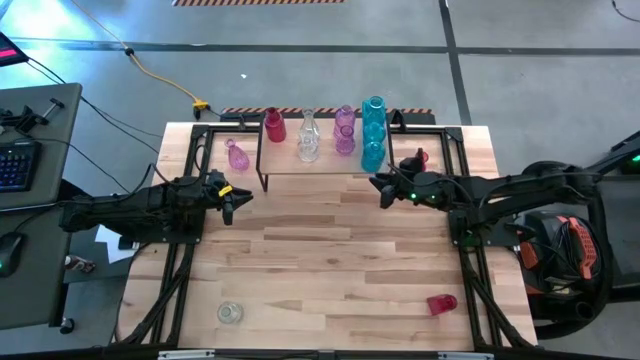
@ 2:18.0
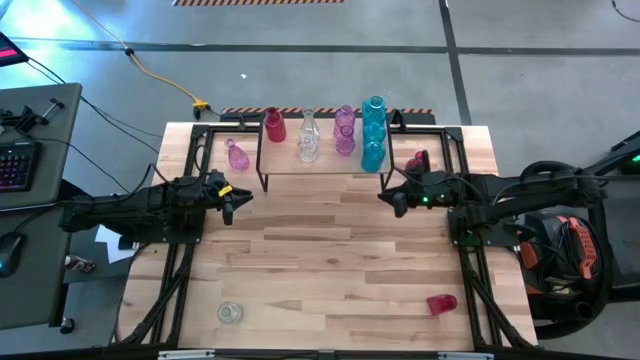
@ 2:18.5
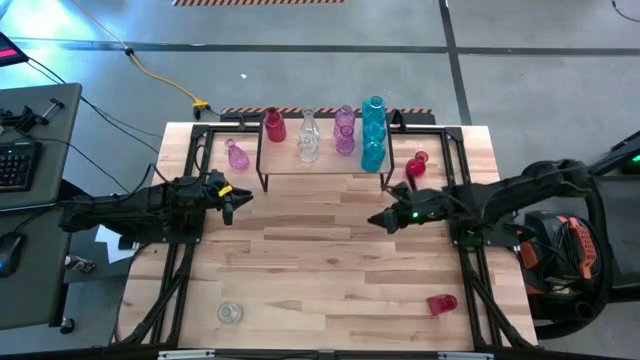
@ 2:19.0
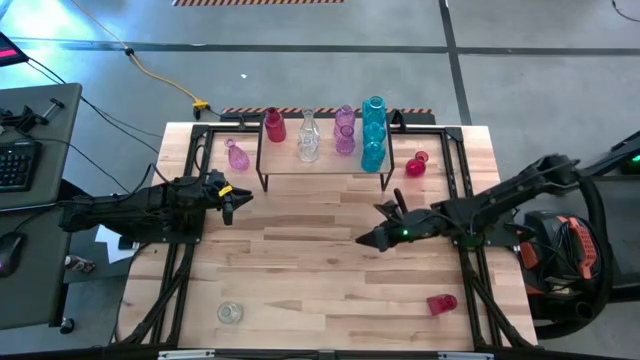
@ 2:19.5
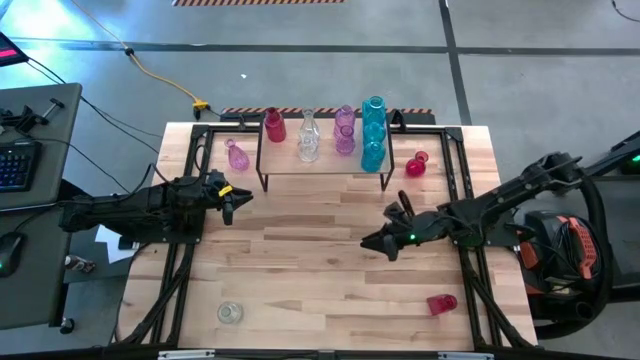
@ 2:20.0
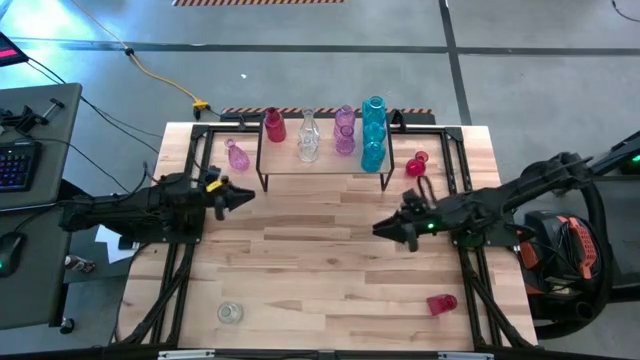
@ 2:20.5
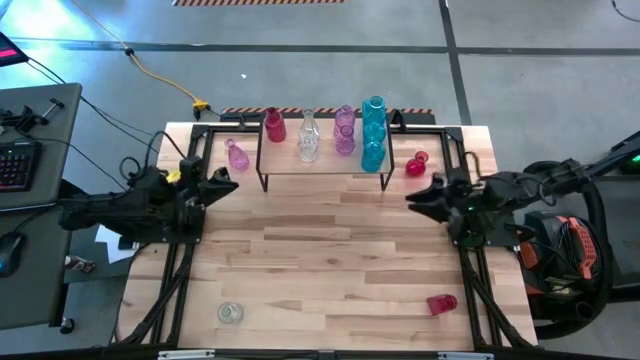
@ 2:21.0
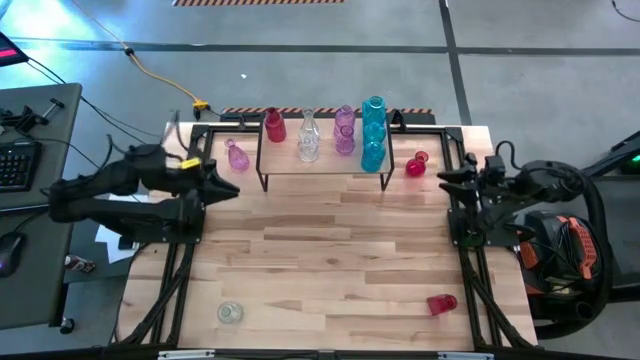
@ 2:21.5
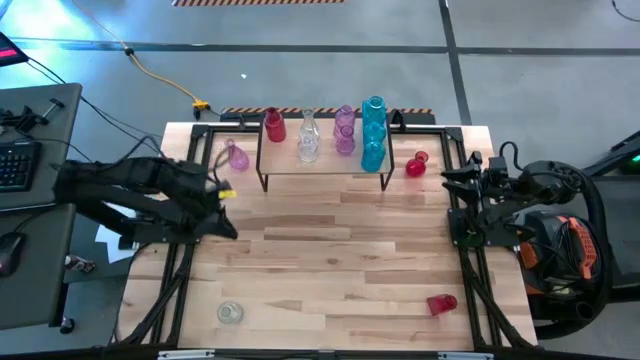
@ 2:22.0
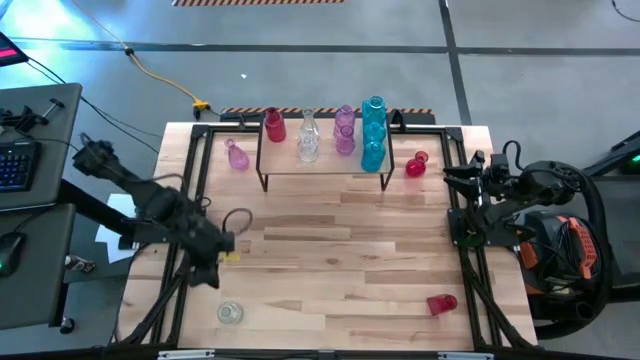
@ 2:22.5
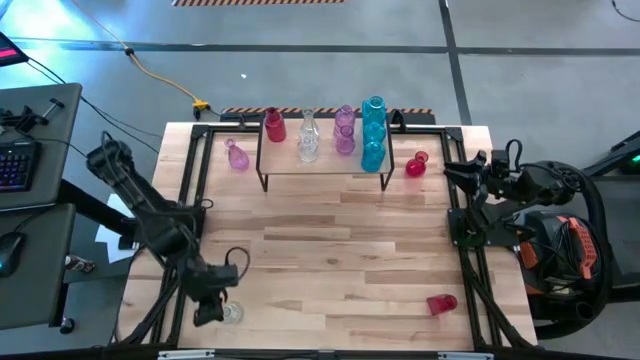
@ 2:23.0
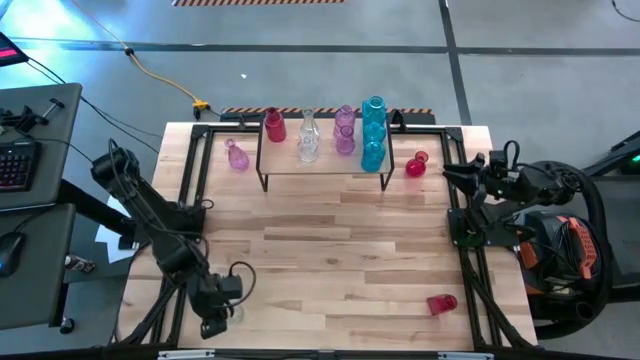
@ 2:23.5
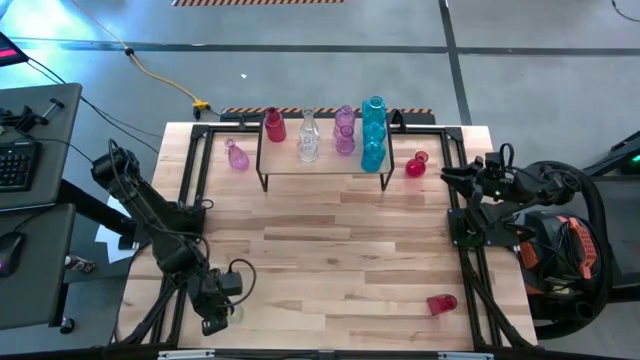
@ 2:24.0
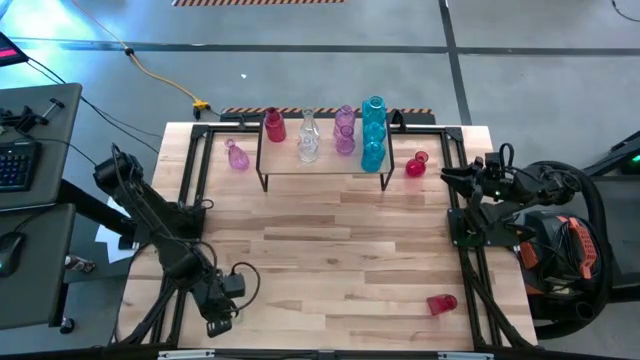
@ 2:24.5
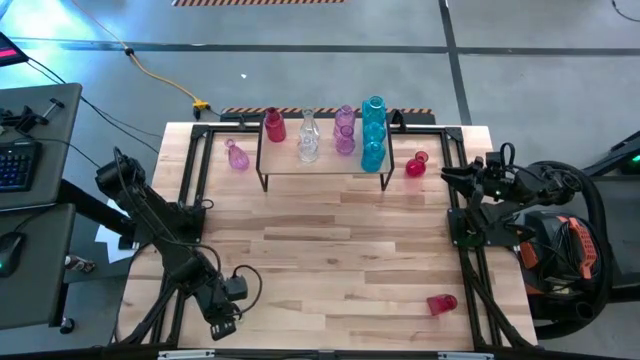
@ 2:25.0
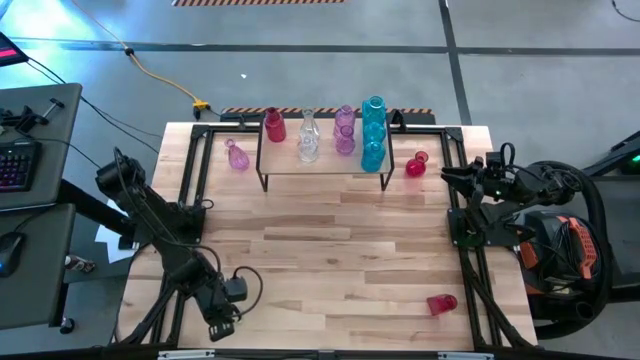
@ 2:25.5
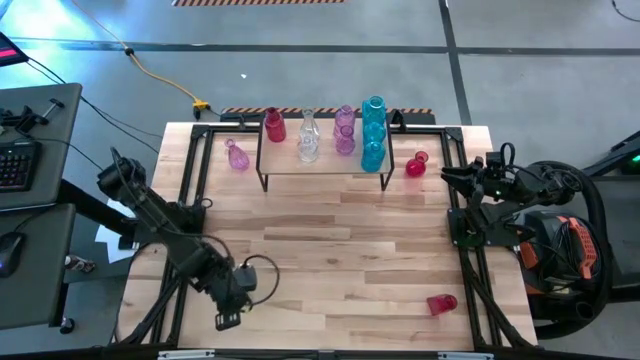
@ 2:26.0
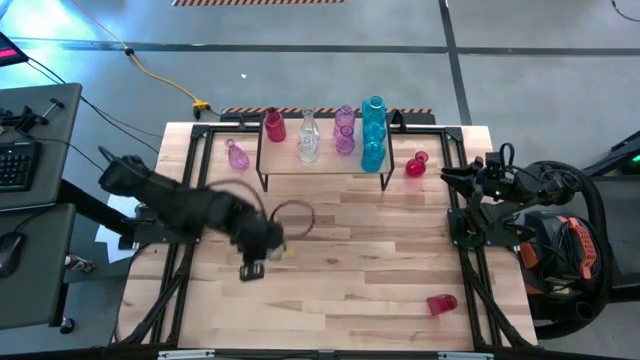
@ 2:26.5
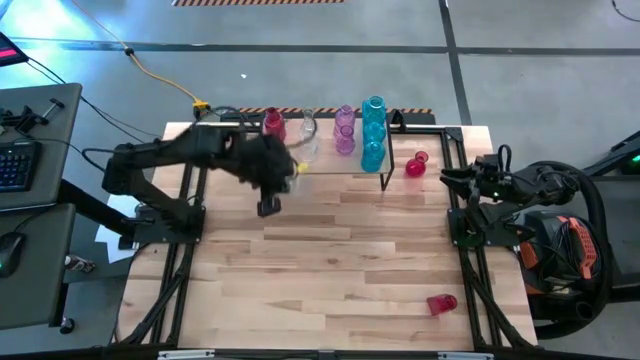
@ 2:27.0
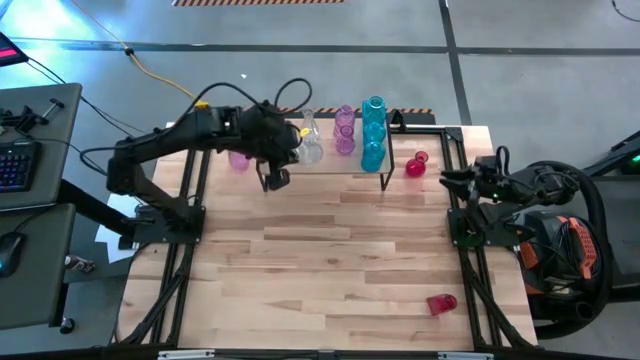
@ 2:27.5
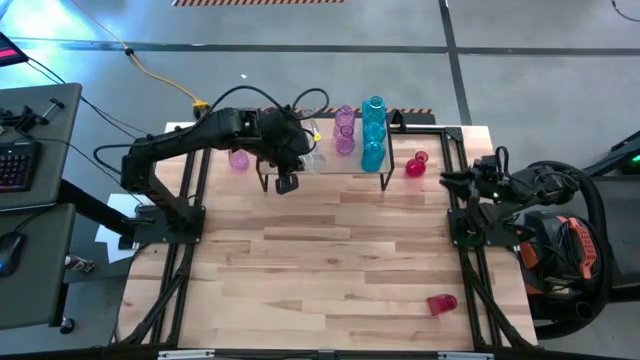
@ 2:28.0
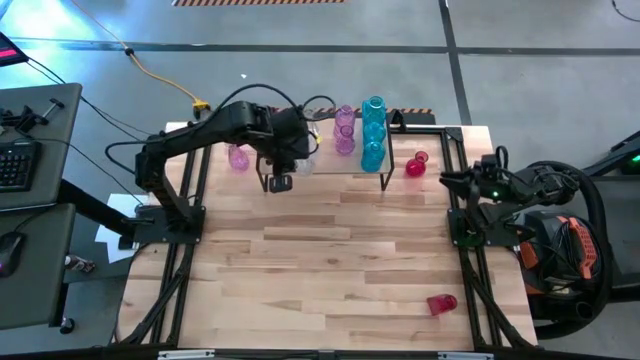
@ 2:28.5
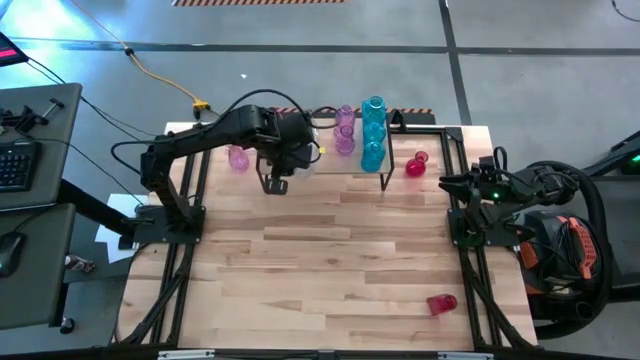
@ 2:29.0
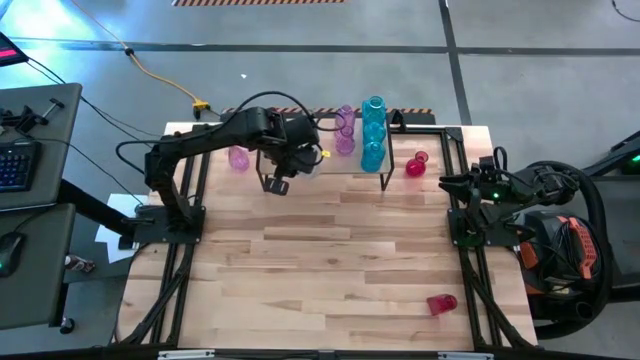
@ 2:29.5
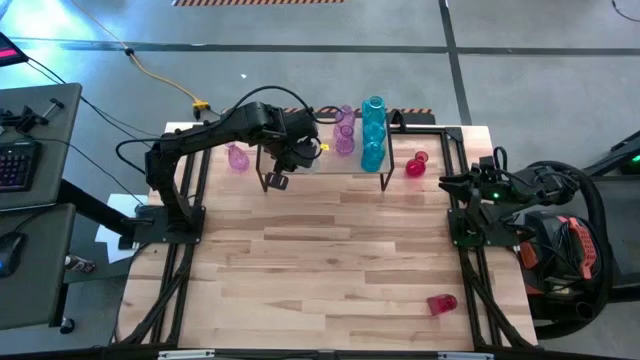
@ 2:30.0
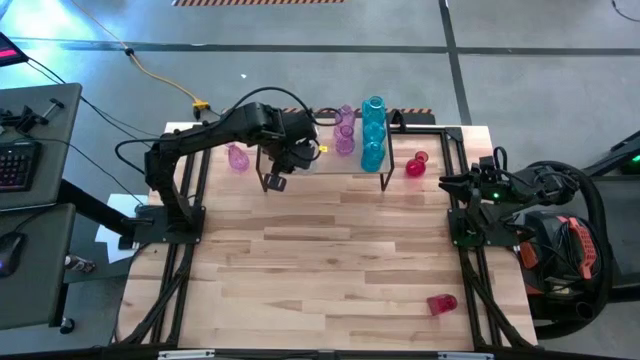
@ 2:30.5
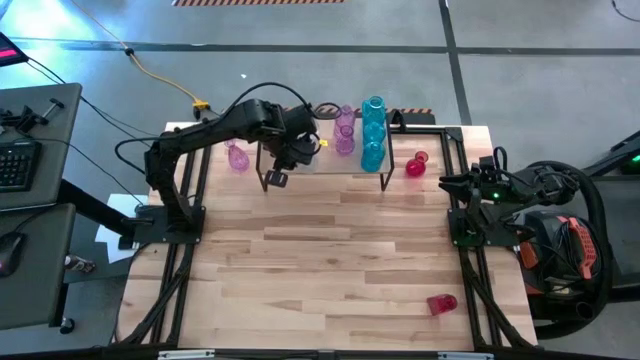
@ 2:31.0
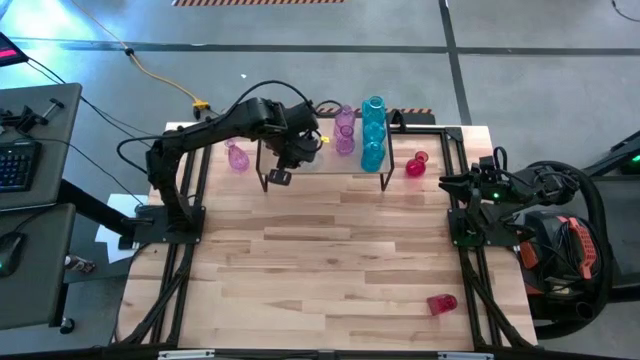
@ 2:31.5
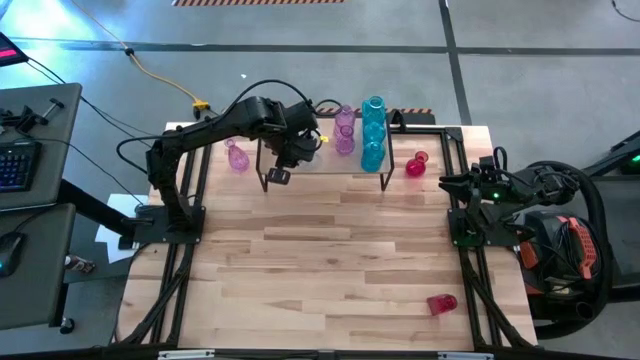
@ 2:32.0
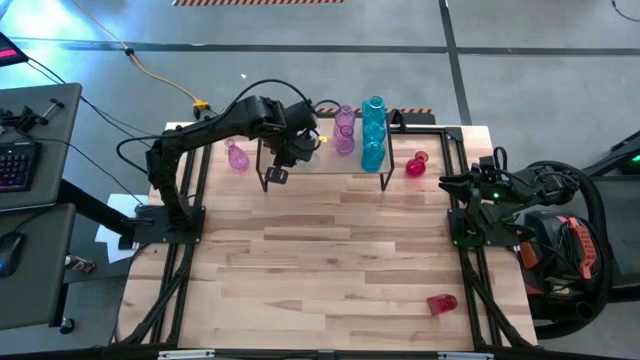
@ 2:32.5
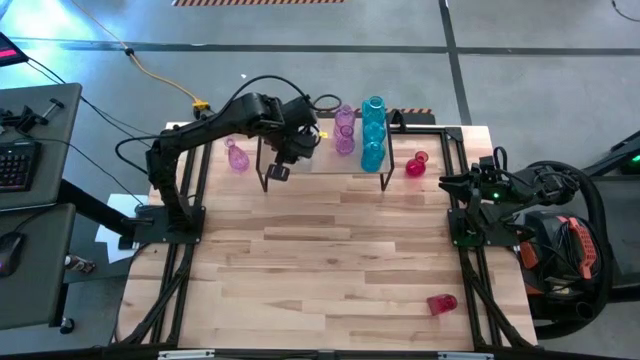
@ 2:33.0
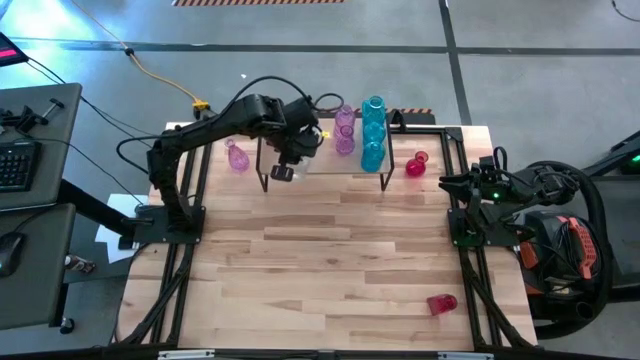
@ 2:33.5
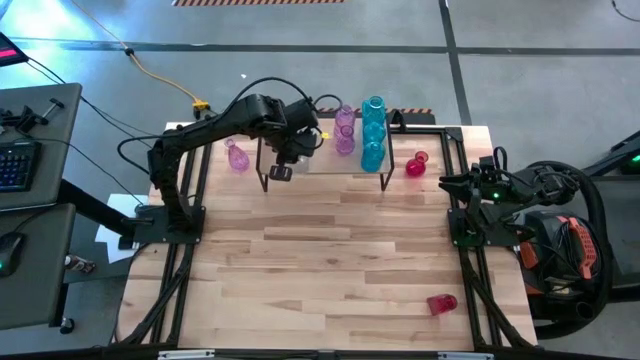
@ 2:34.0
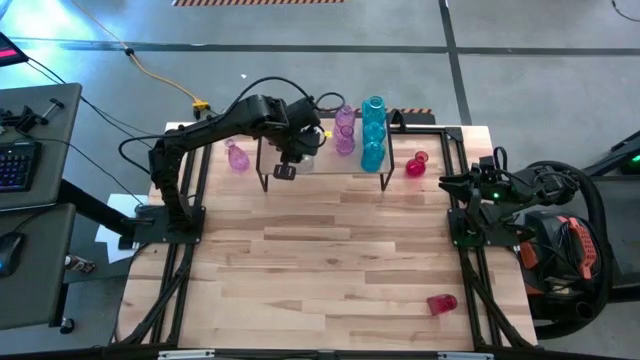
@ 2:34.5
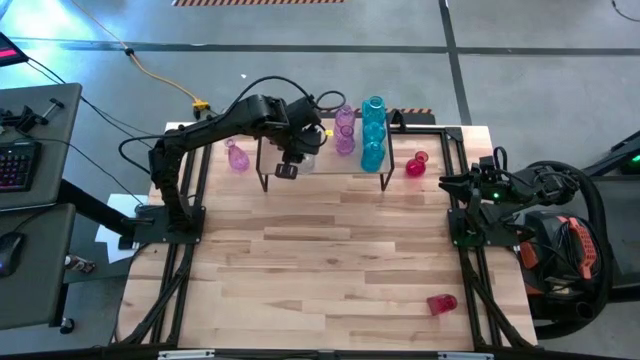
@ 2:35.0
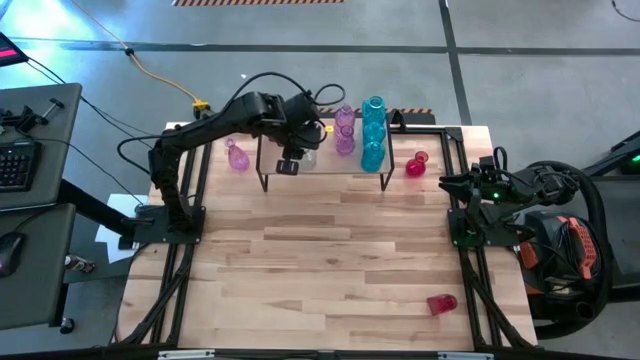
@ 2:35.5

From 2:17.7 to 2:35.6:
Task: sort vases onto shelf
Put the transparent vase on the shelf aligned with the other transparent vases

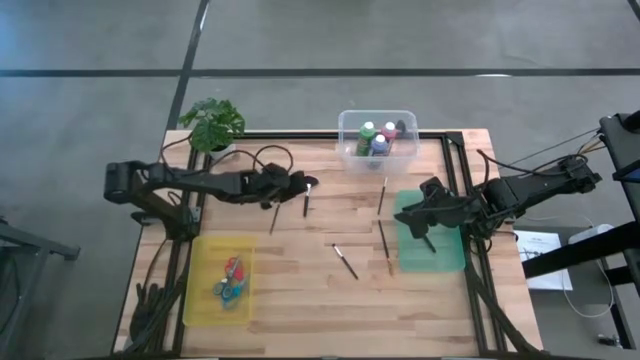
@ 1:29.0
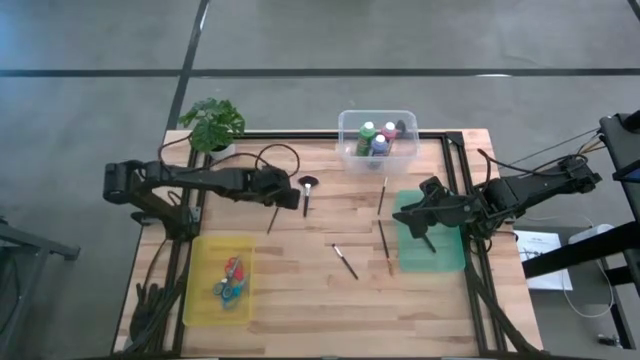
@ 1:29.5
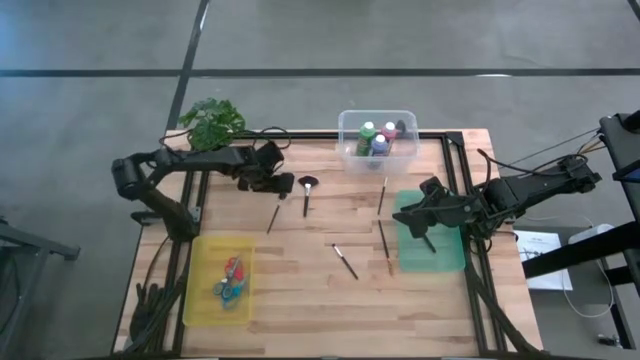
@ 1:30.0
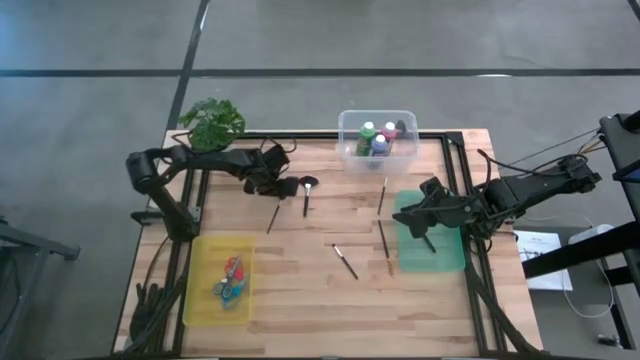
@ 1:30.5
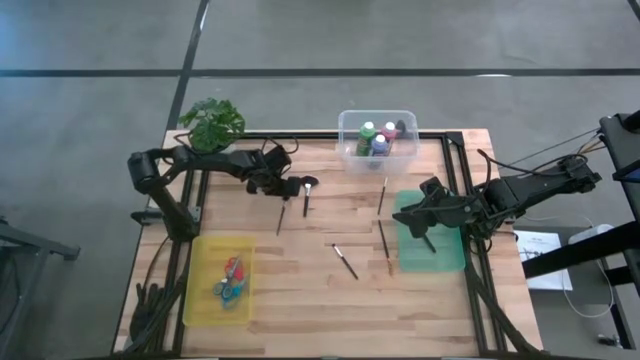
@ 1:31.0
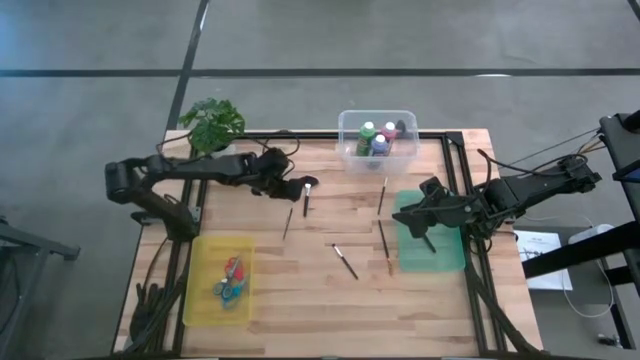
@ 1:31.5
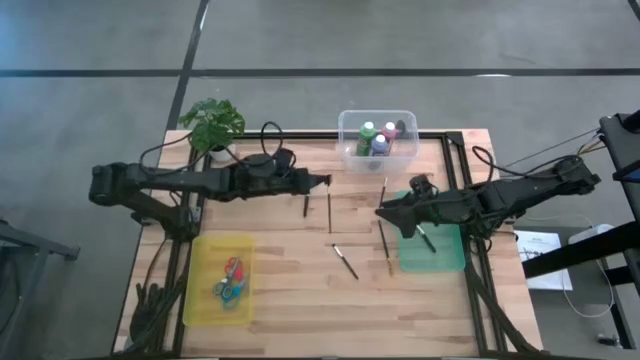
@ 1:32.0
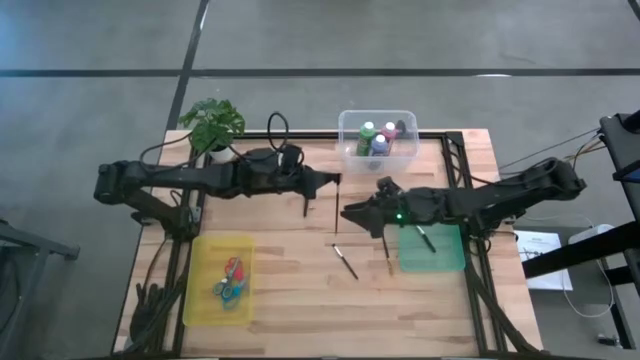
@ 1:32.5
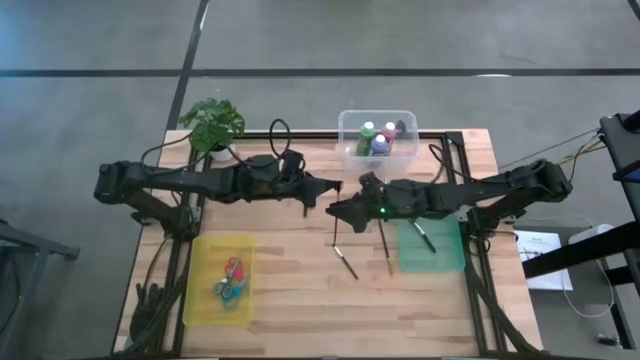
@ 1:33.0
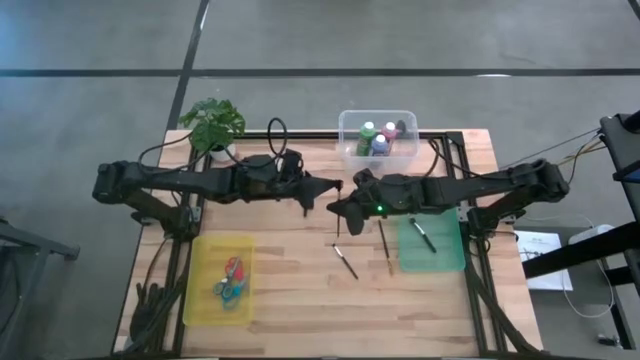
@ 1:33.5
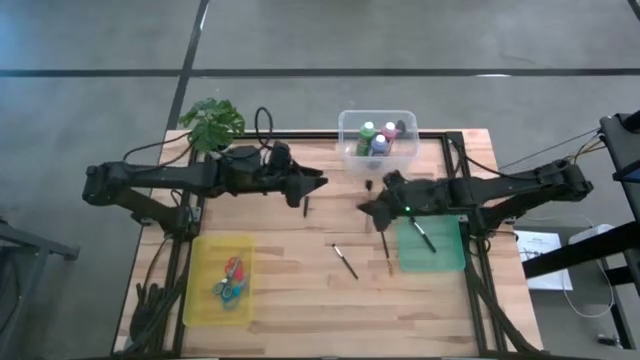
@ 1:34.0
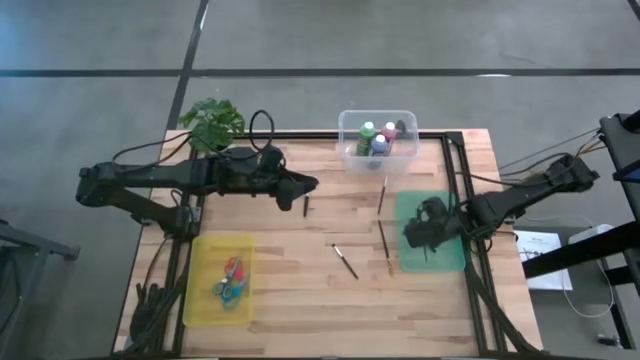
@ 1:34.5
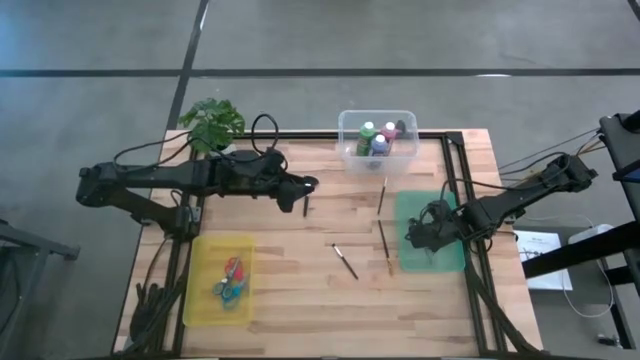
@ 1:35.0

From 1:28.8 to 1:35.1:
Task: Pick & Place Paint Supplies
Put the black eyebrow and eyelash brush into the green bin
